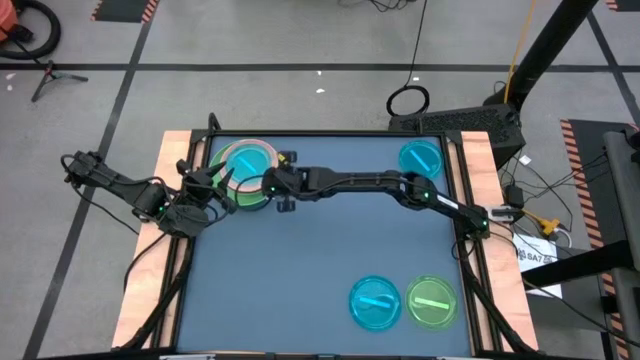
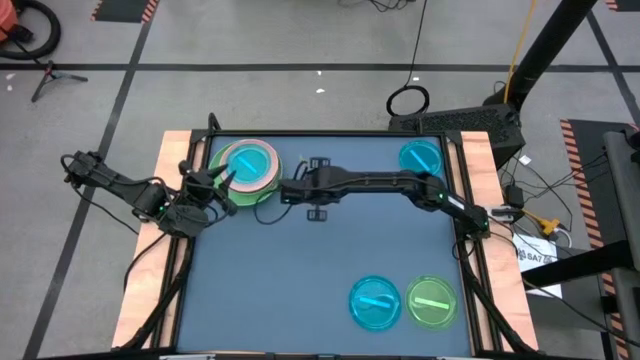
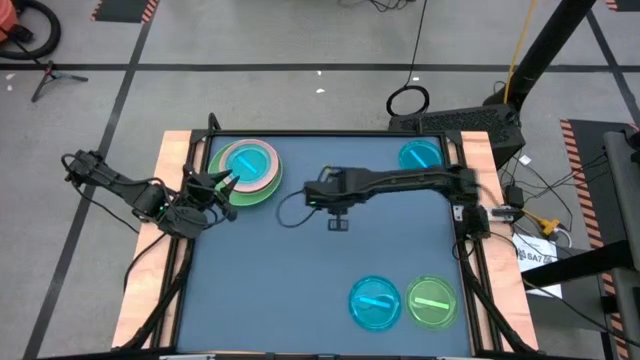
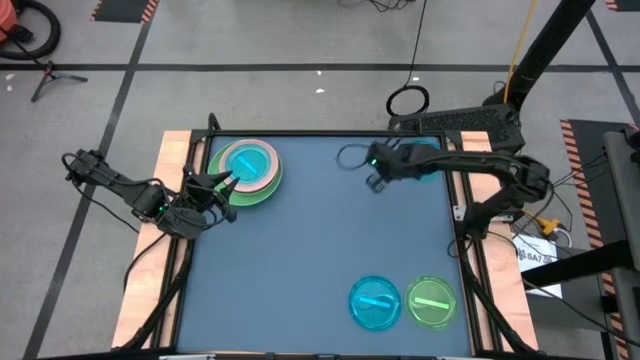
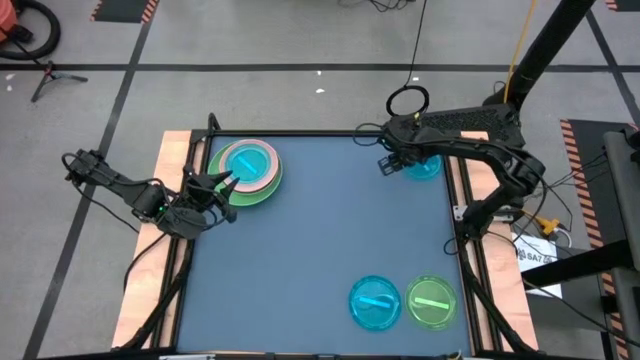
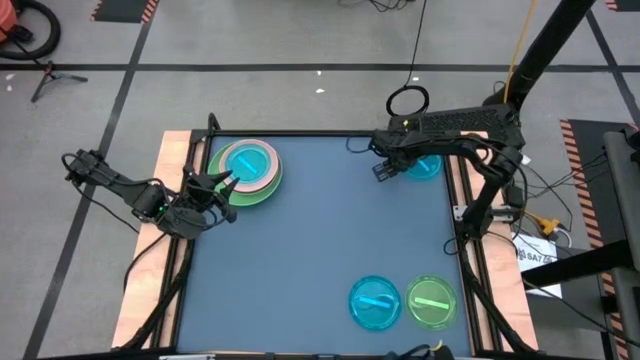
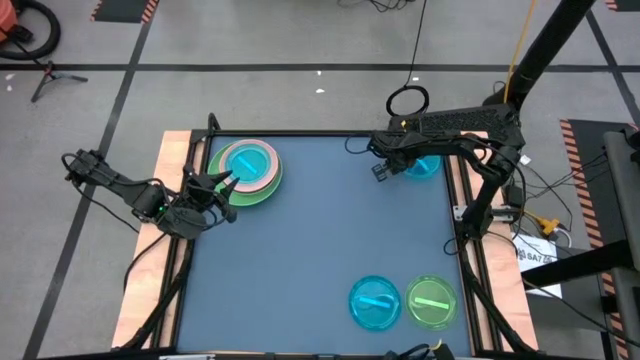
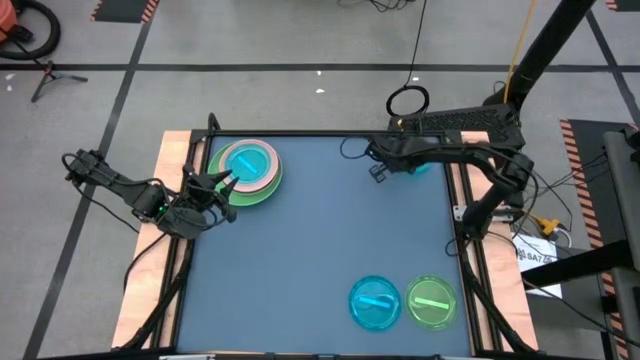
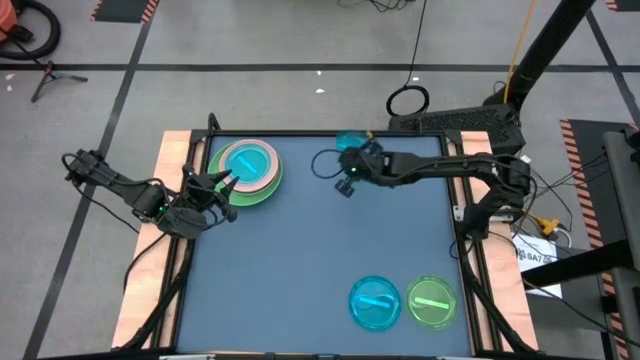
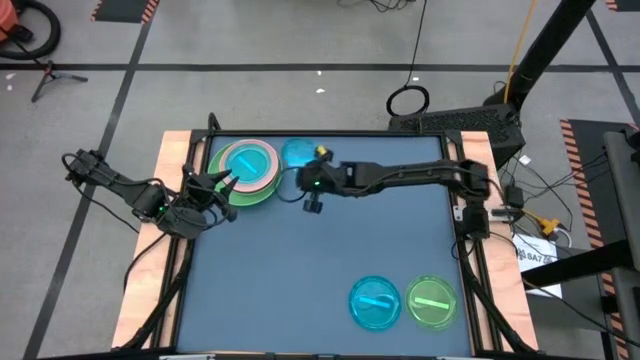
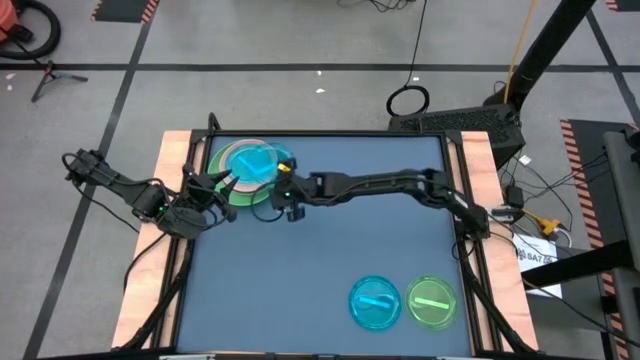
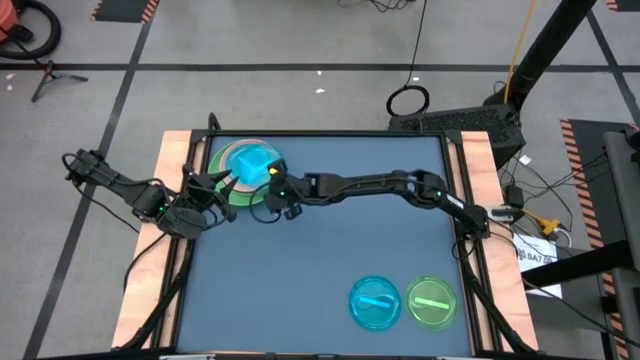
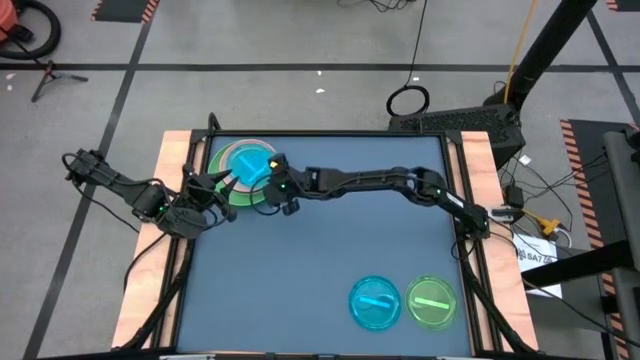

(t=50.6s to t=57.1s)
Task: Stack plastic plates
Stack the top right blue plate on top of the top left blue plate

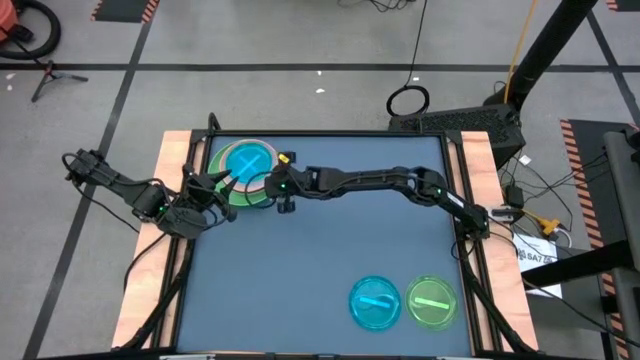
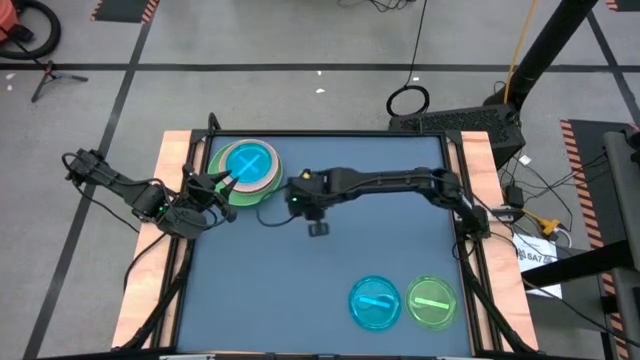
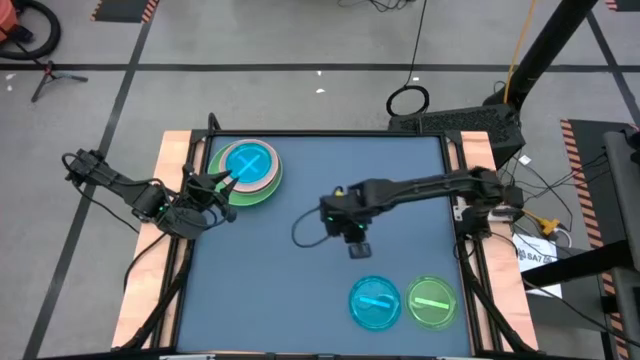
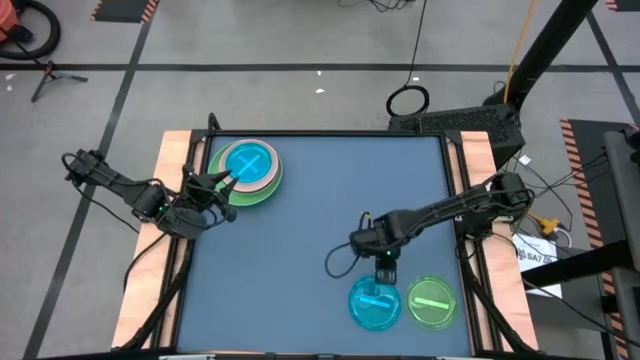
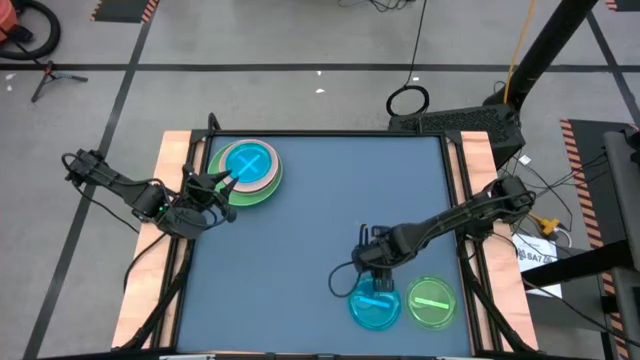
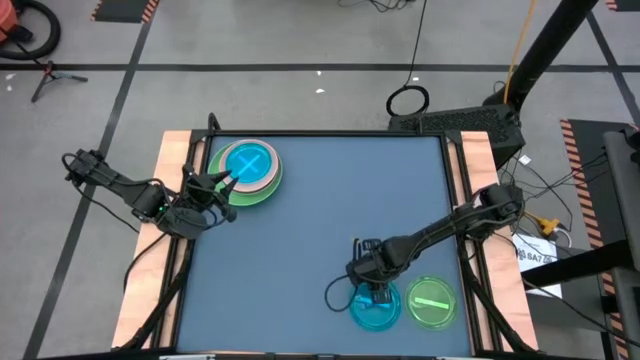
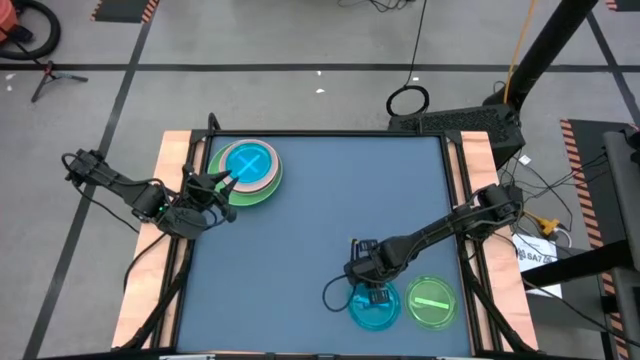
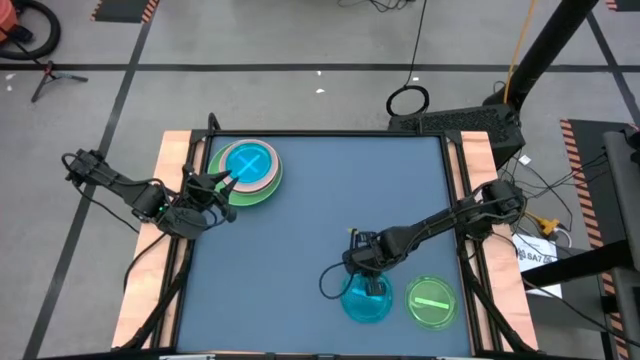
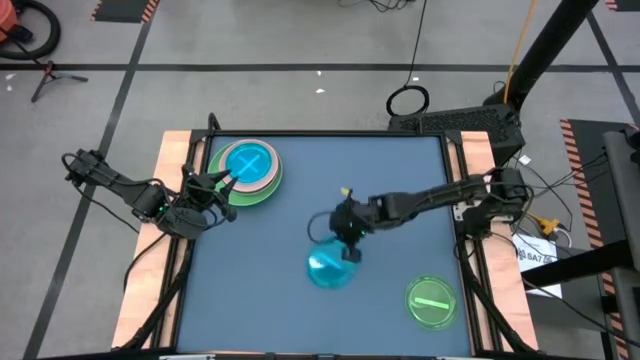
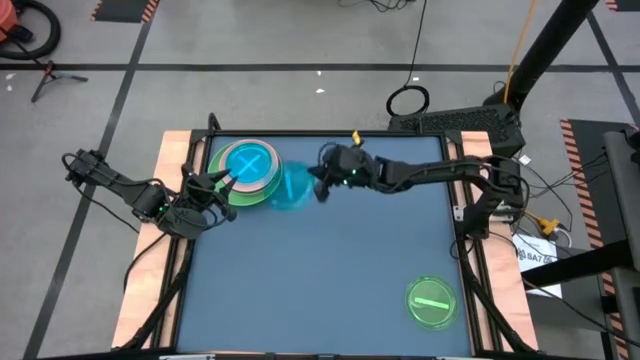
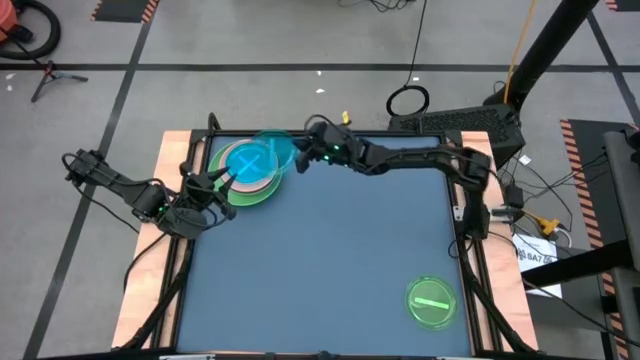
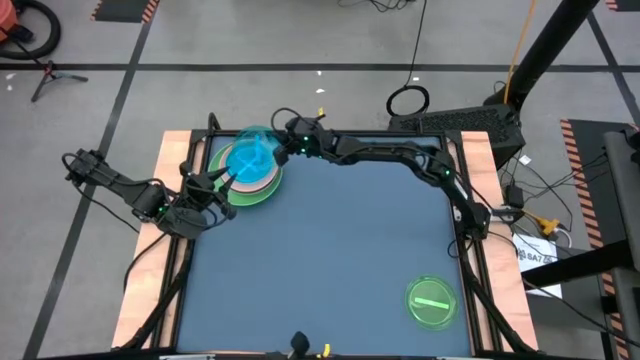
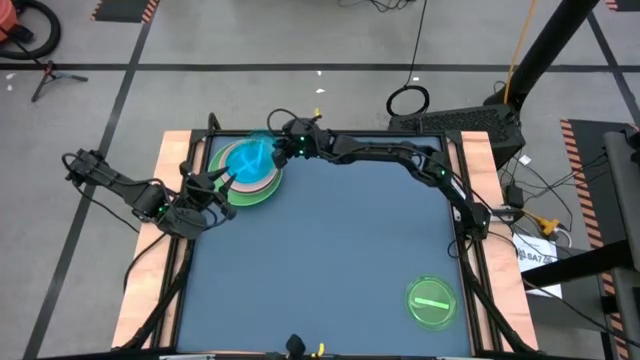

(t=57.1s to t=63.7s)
Stack the bottom blue plate on top of the top blue plate

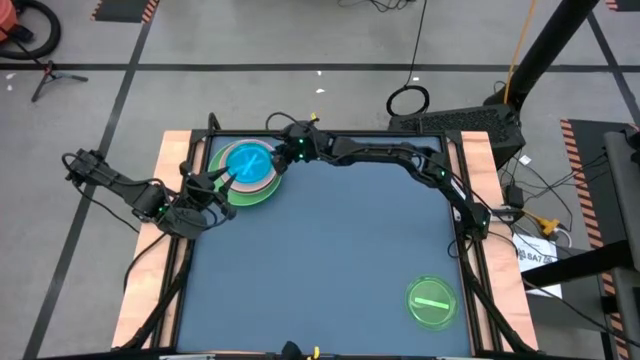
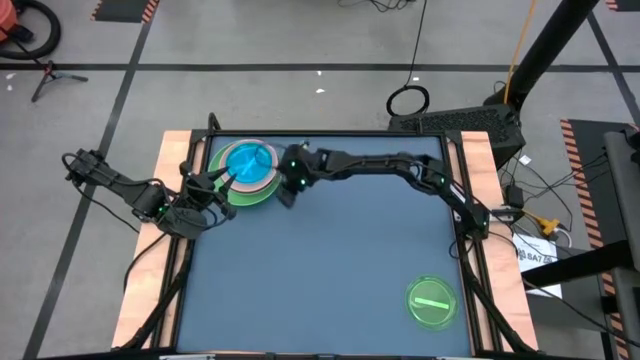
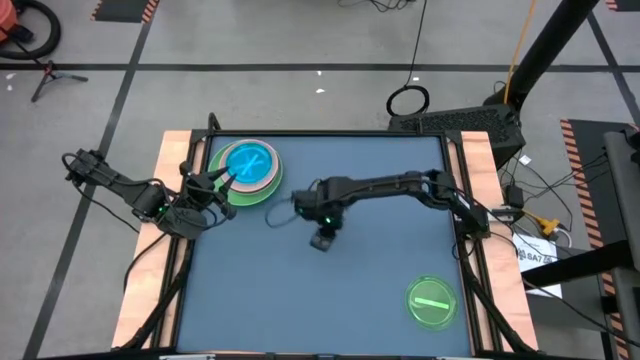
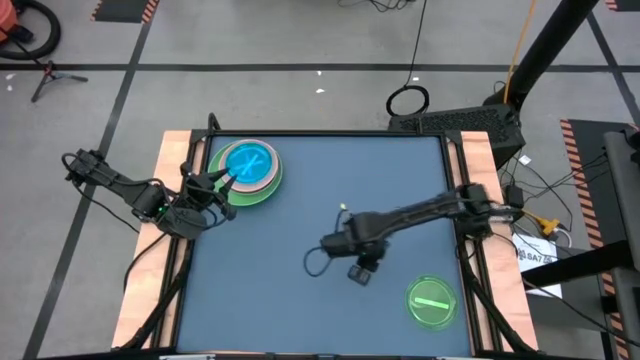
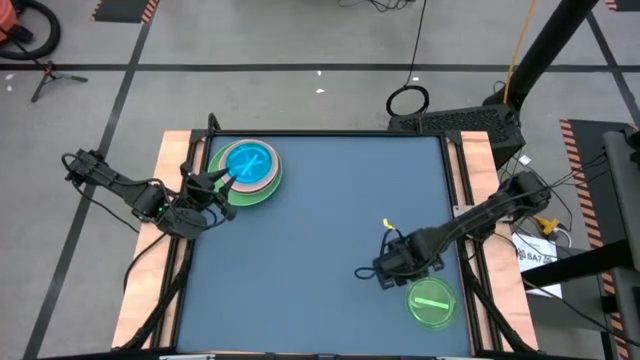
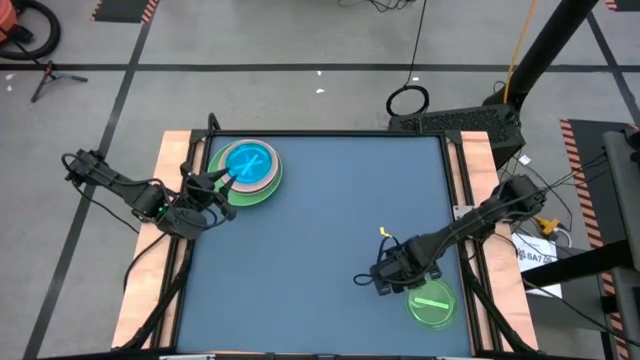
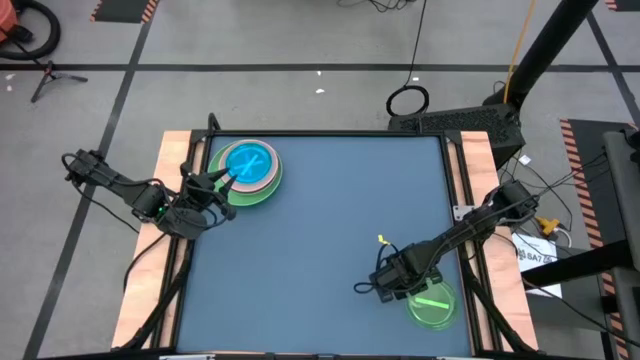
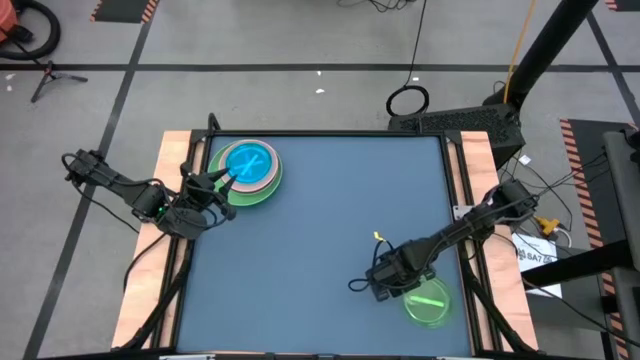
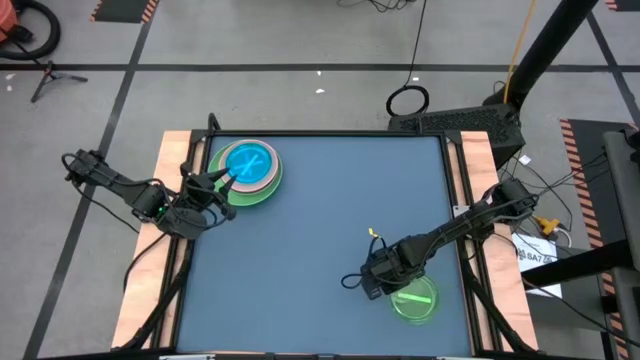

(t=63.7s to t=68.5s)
Stack the green plate on top of the blue plate

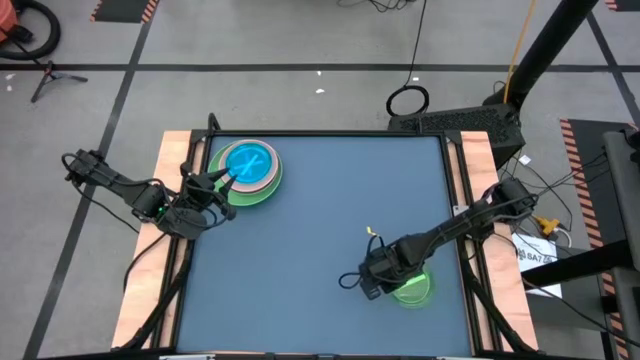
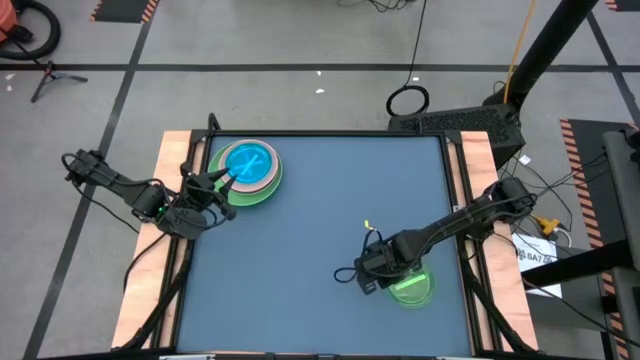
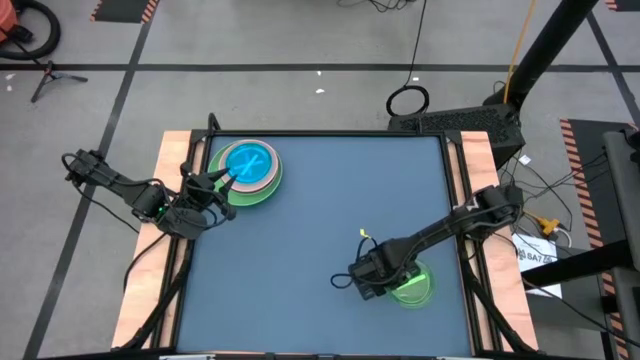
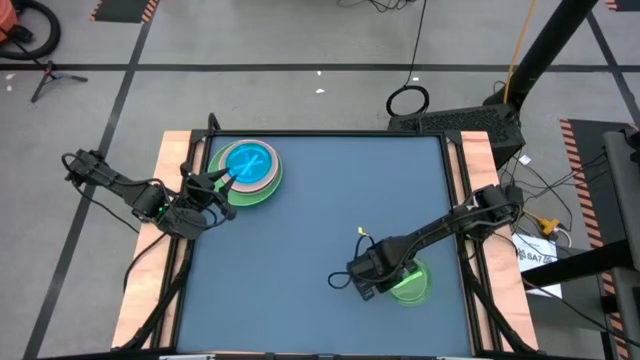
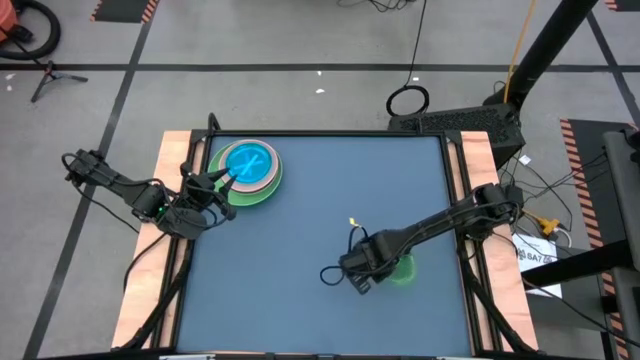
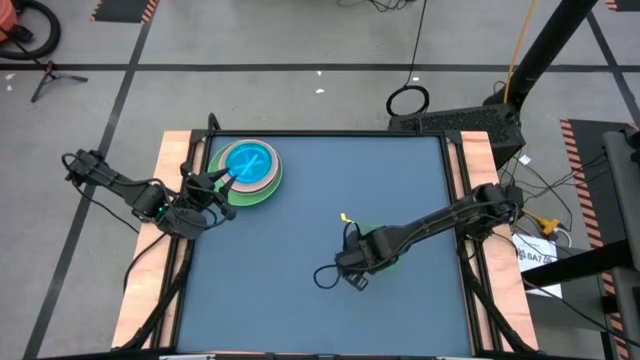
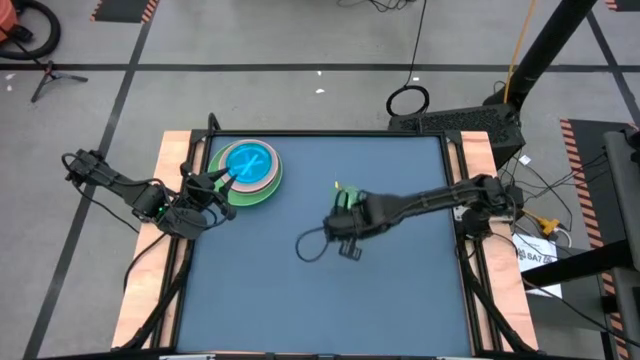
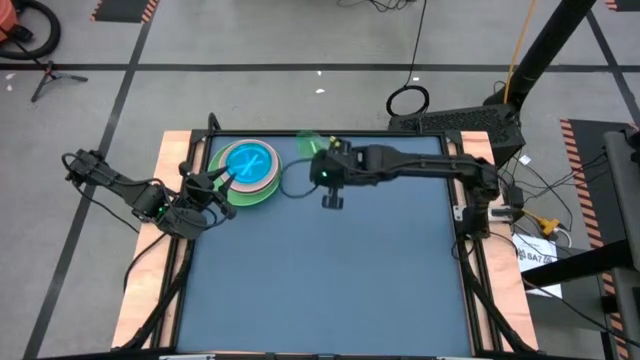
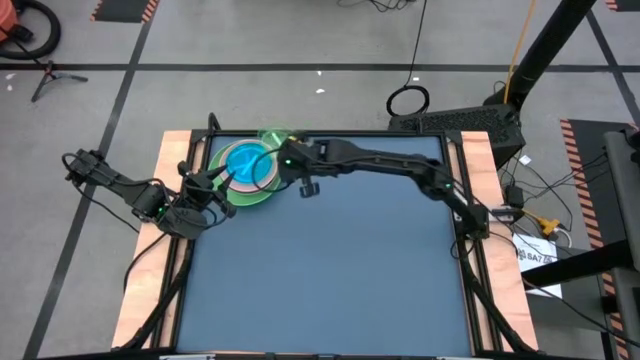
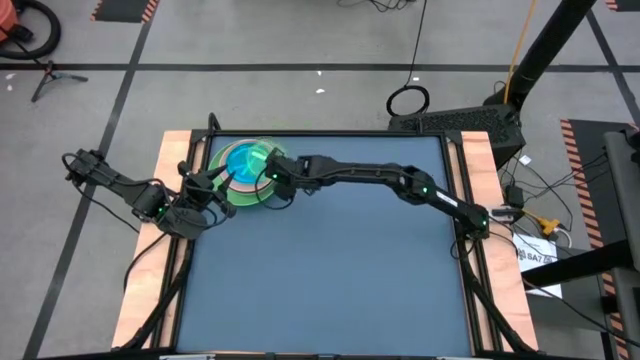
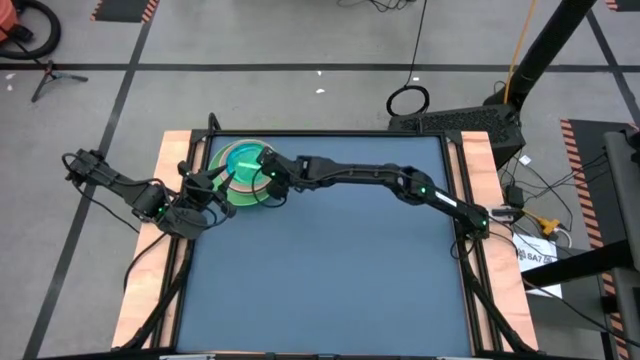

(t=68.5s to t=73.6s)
Stack the green plate on top of the blue plate
